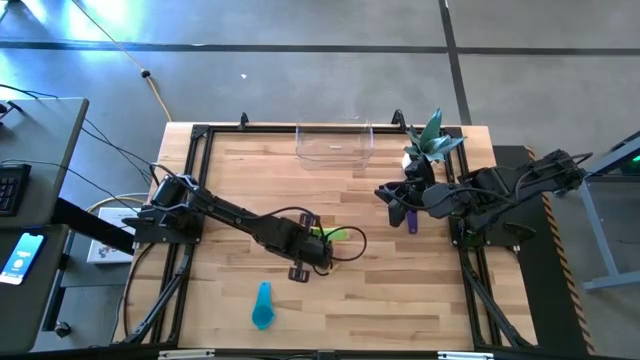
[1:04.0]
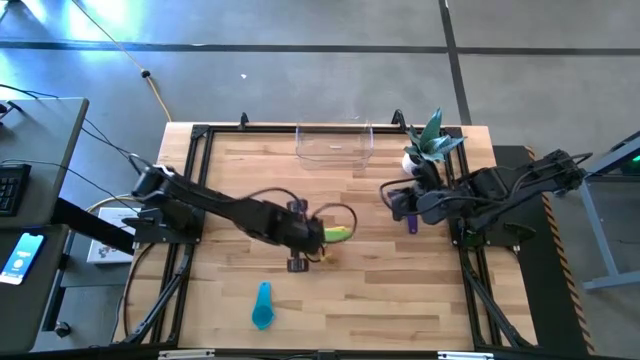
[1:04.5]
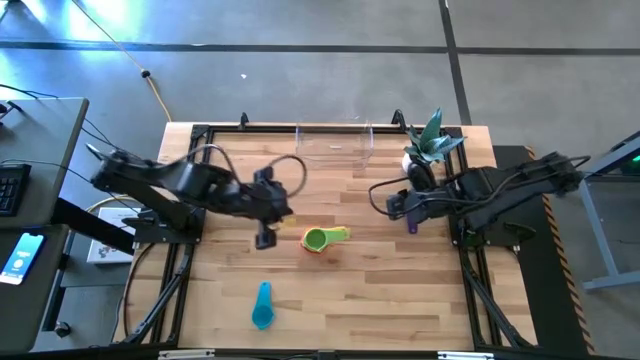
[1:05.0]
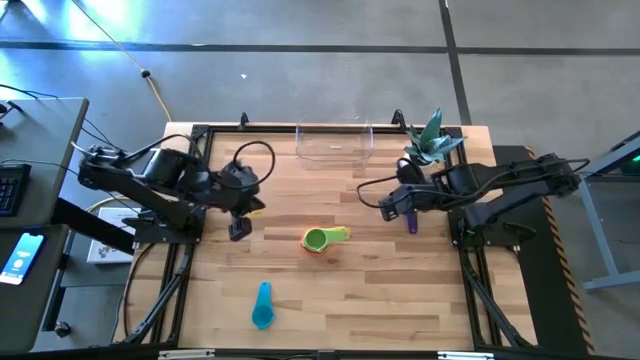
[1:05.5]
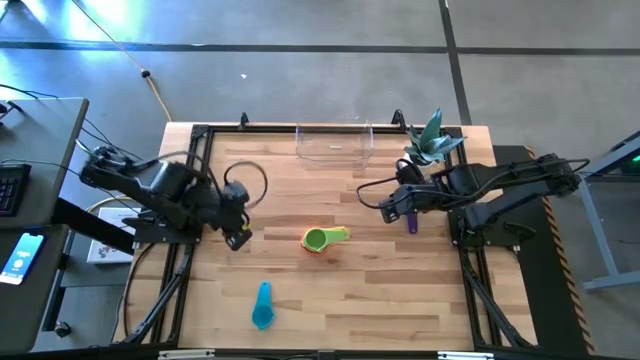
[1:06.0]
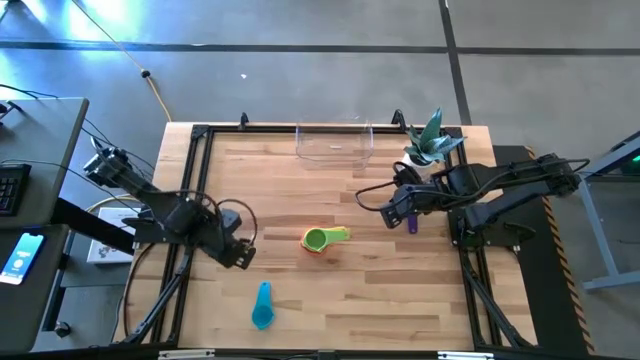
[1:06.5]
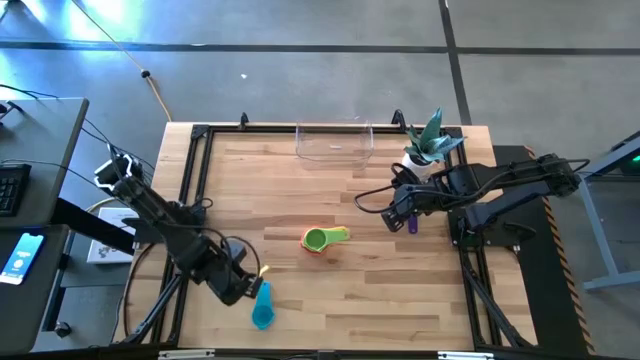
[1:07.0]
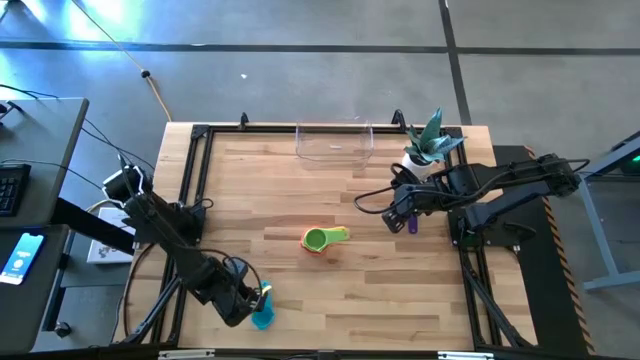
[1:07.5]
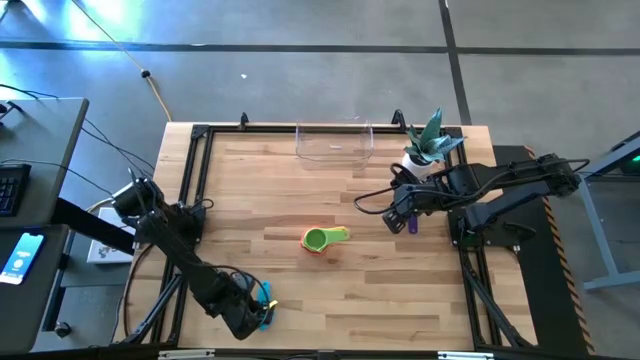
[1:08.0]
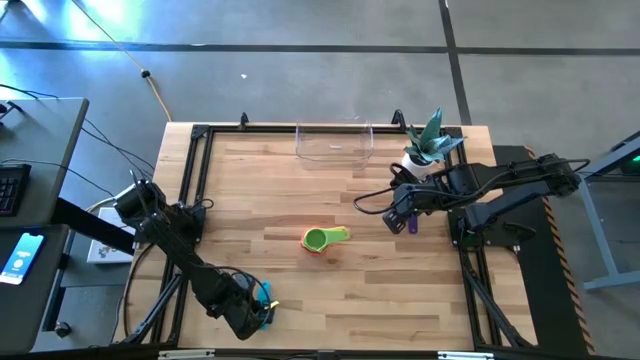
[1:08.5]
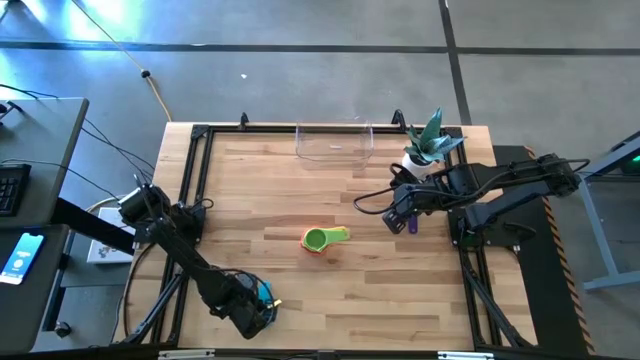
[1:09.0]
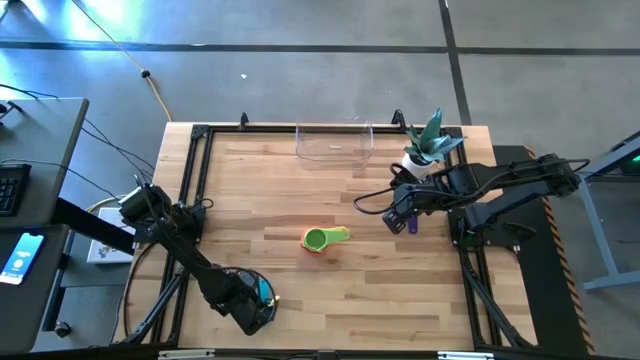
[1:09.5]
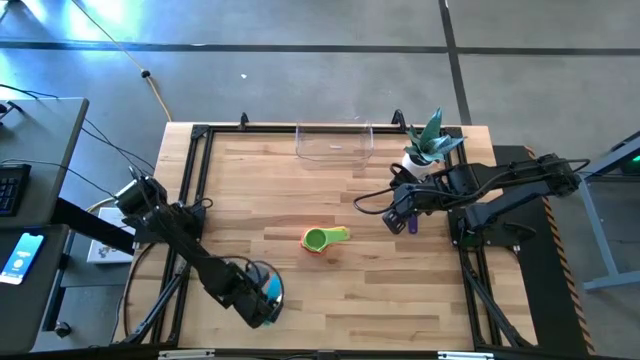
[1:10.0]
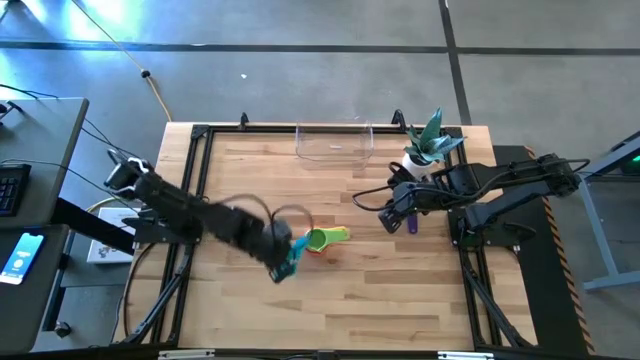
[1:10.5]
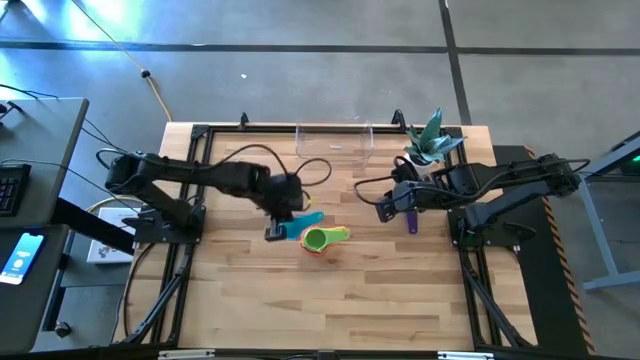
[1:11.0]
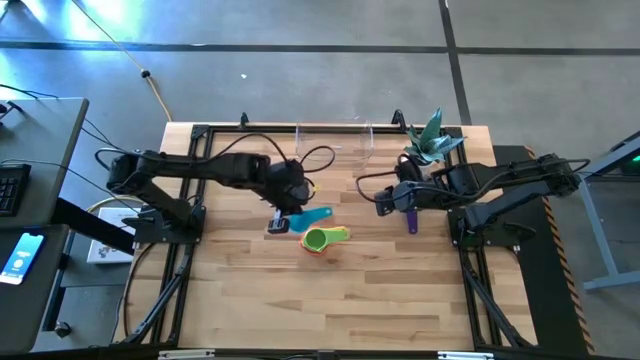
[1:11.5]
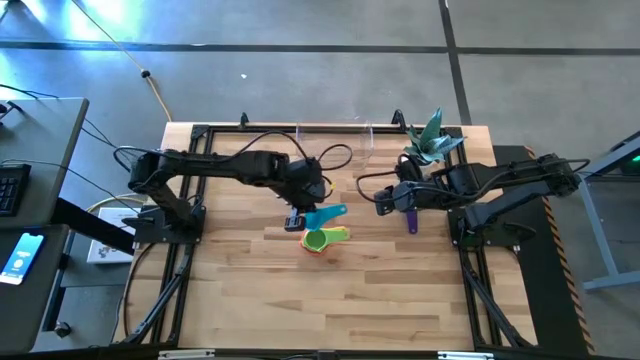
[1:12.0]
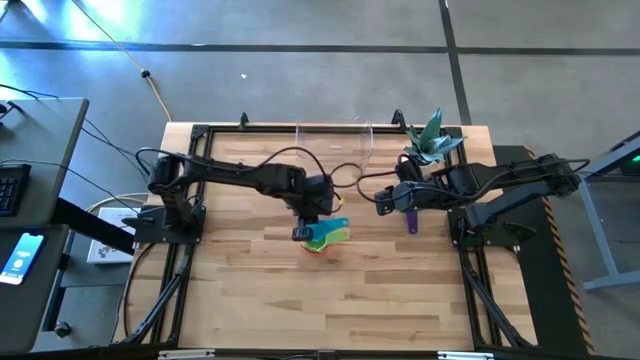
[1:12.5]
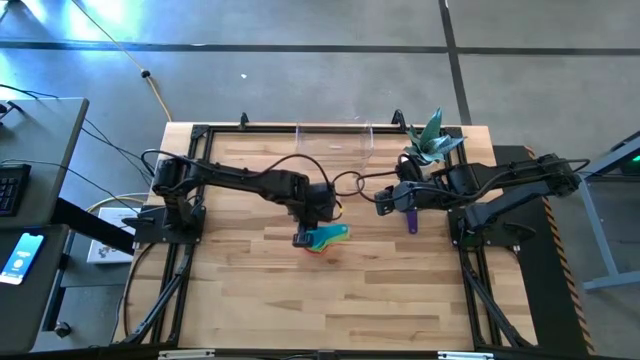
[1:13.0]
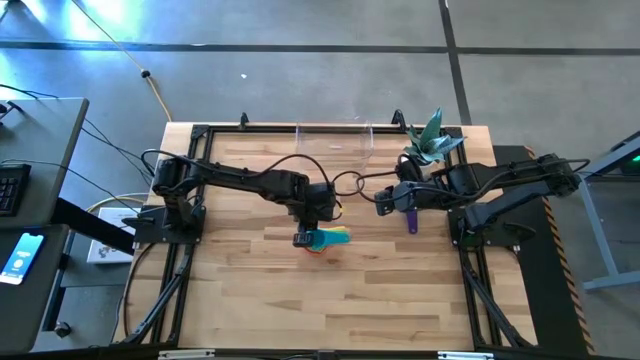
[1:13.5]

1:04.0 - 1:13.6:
Task: Nest measuring cups in basket
Stack the bottom blue measuring cup on top of the green measuring cup

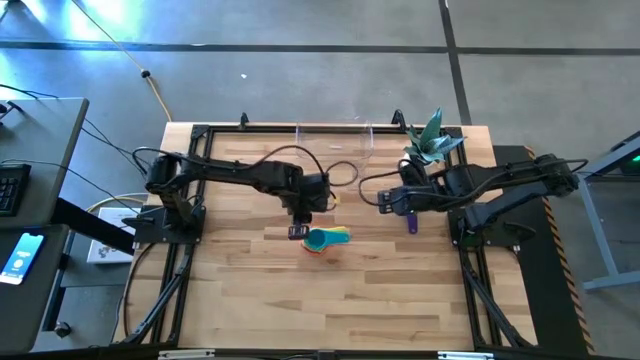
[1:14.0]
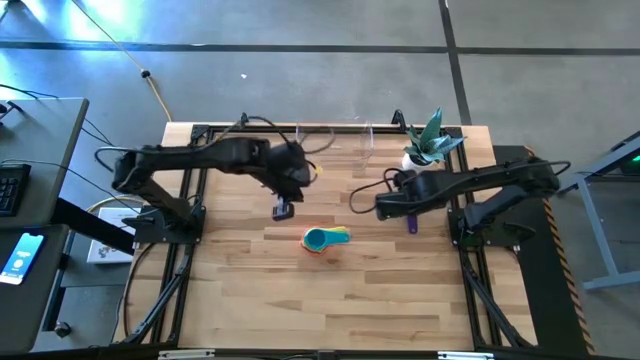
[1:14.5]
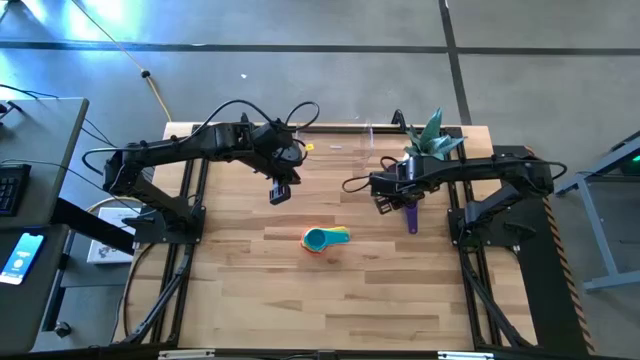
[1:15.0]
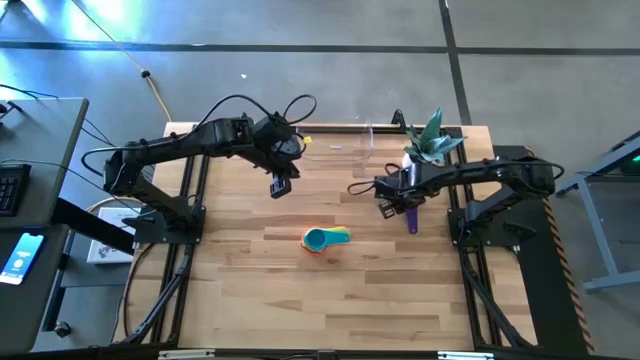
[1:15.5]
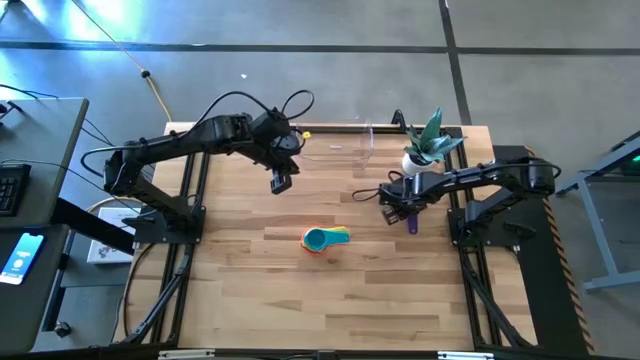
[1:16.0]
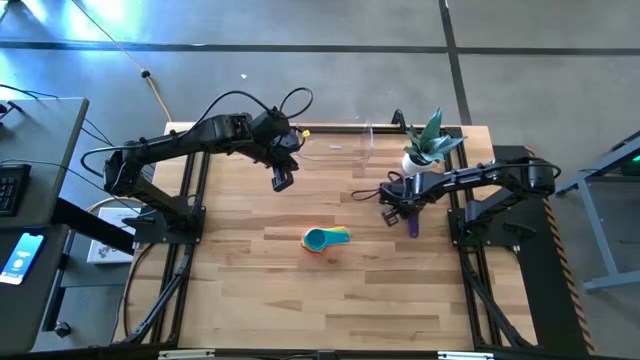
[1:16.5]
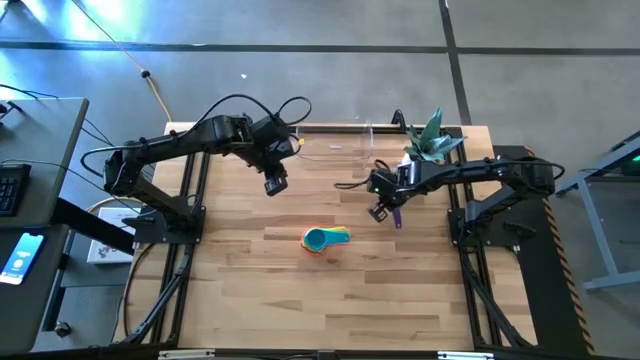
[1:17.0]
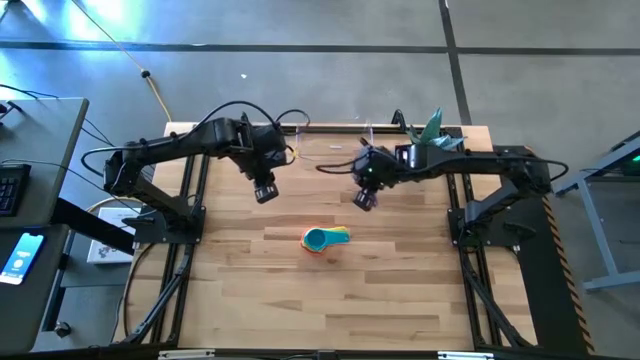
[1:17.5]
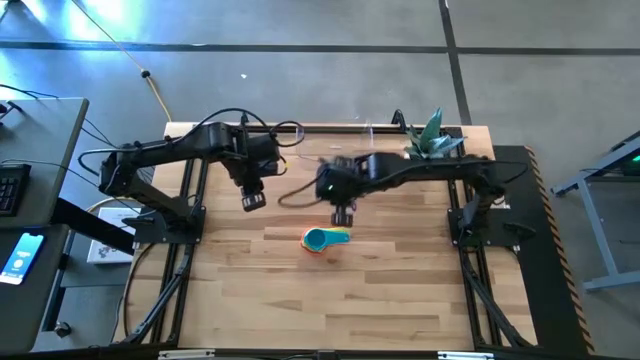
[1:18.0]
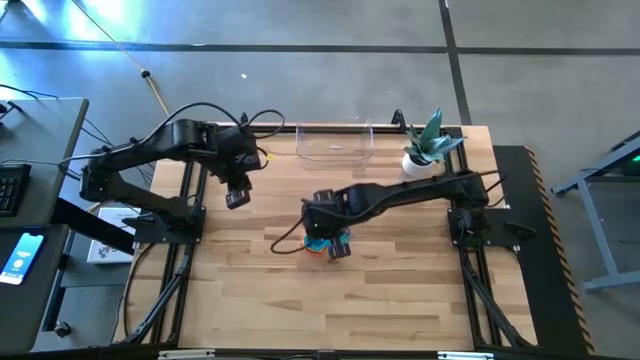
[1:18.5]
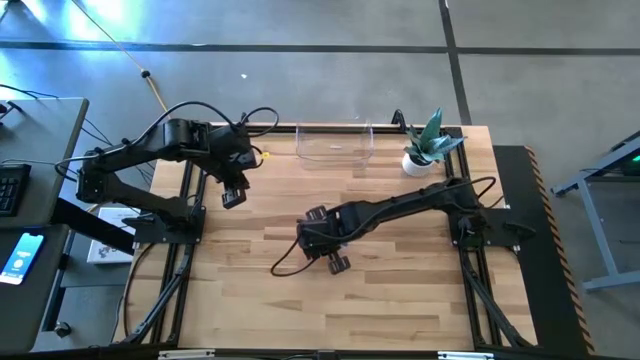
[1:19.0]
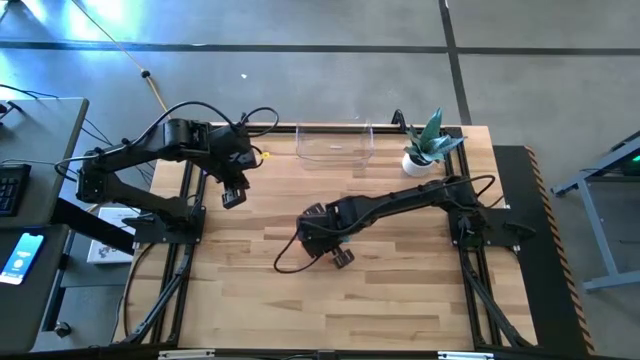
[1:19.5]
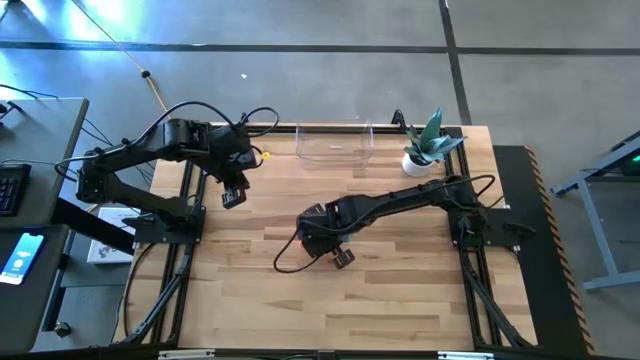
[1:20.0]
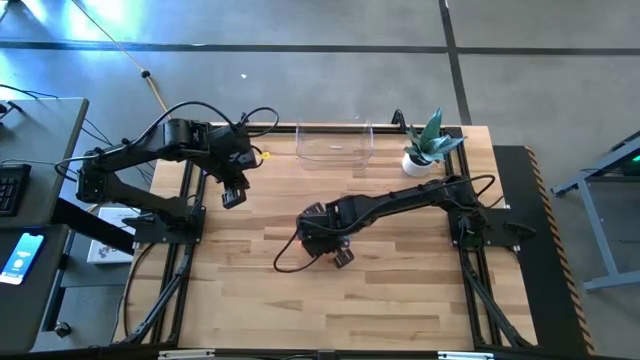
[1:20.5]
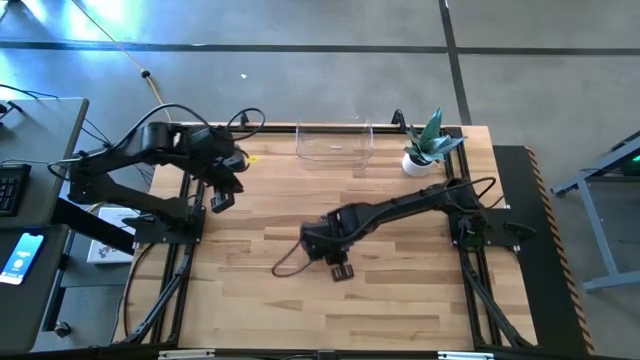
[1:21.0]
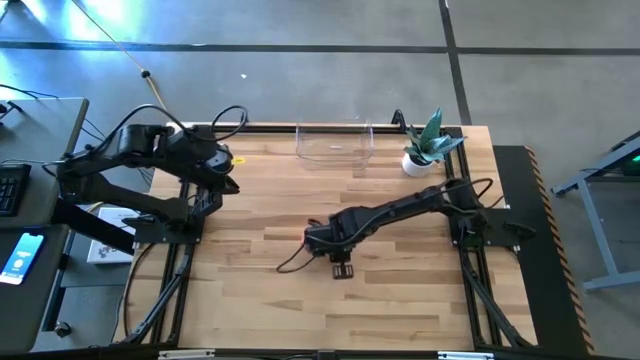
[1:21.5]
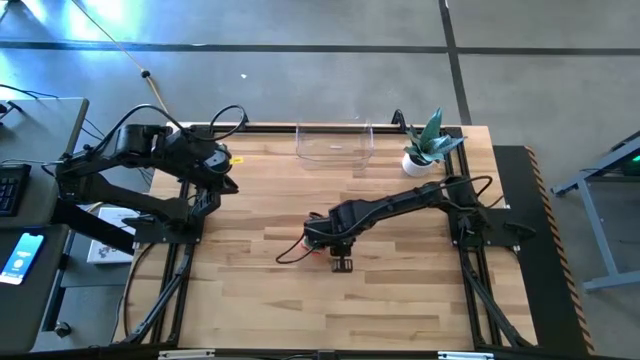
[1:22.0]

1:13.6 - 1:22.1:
Stack the blue measuring cup on top of the blue measuring cup

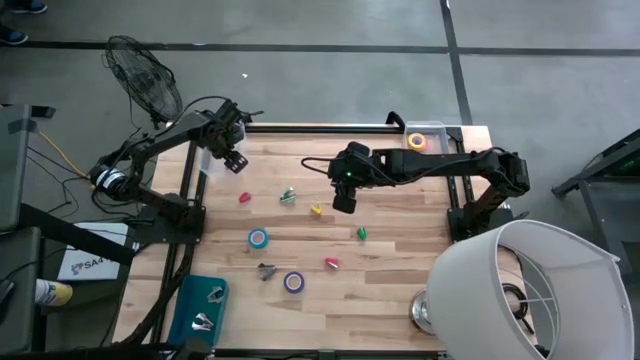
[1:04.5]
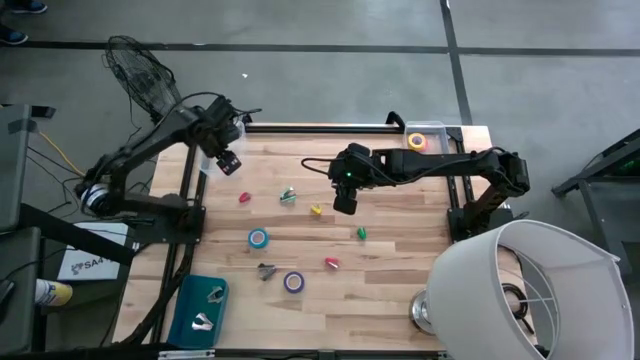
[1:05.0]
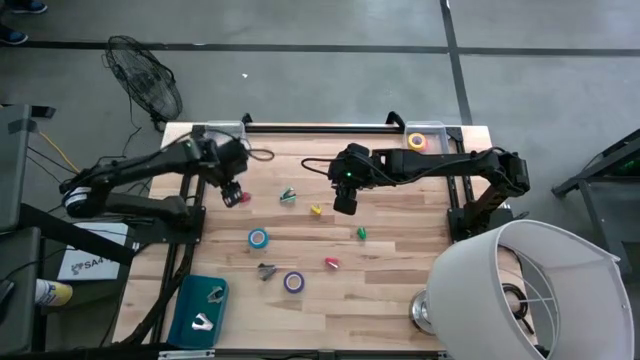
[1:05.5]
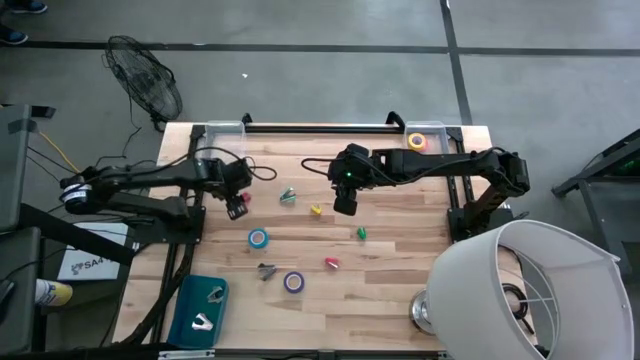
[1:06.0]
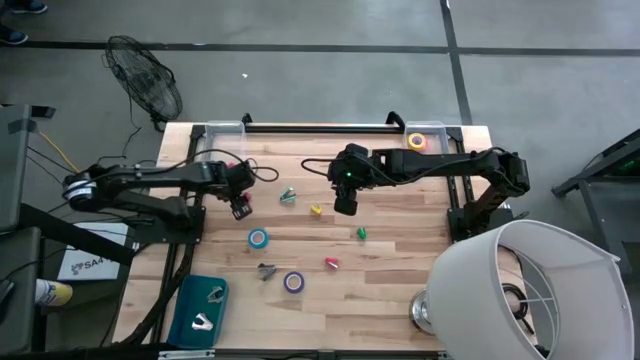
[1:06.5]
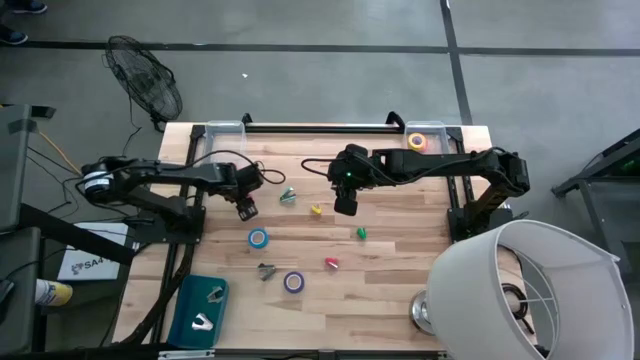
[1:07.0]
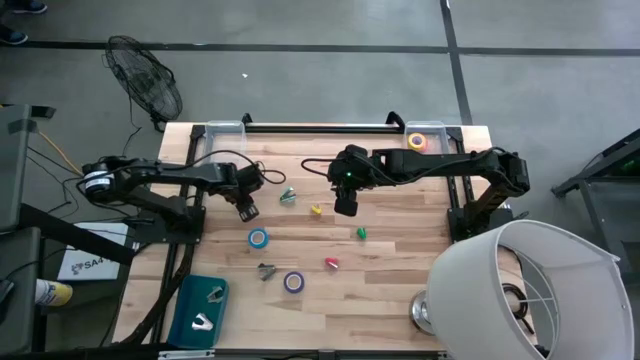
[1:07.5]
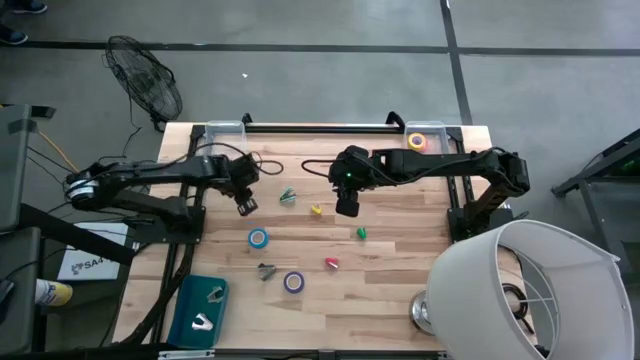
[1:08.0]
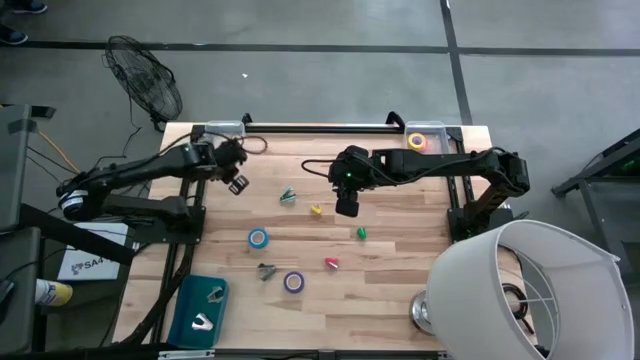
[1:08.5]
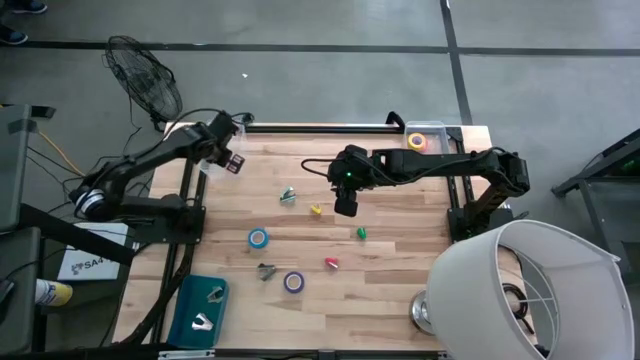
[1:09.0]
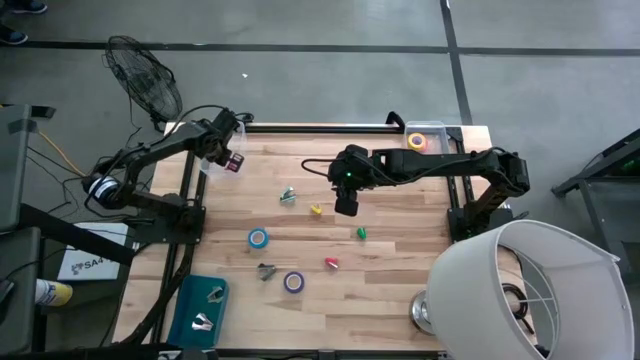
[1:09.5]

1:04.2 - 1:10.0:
Task: Pick and place Stapler, Stapler remover, tape
Put the left red stapler into the left transparent bin
